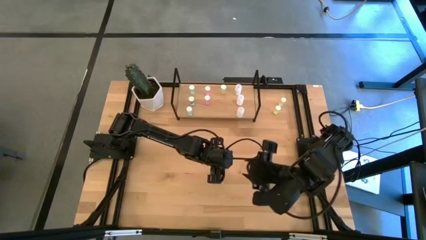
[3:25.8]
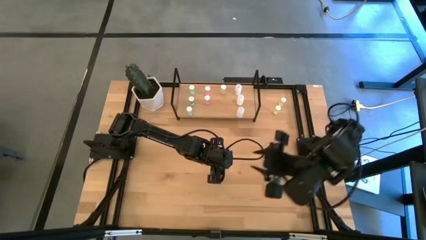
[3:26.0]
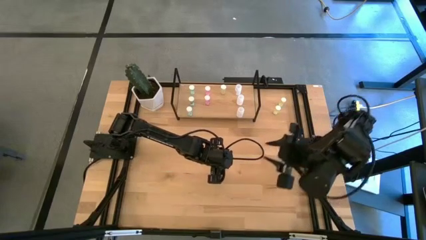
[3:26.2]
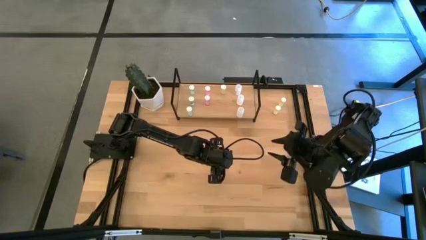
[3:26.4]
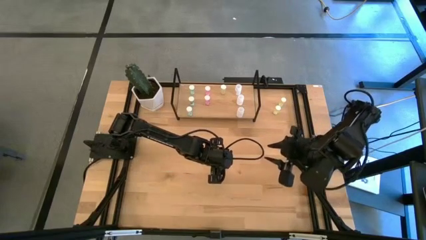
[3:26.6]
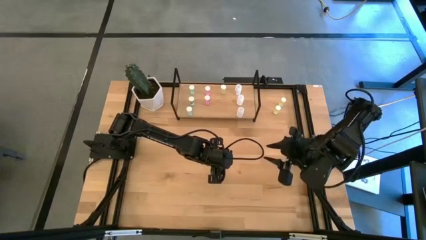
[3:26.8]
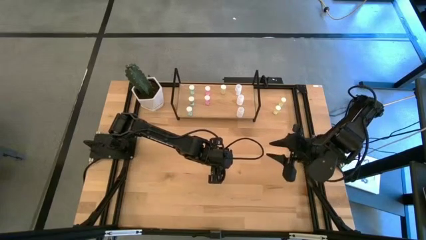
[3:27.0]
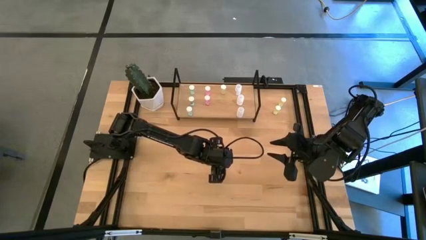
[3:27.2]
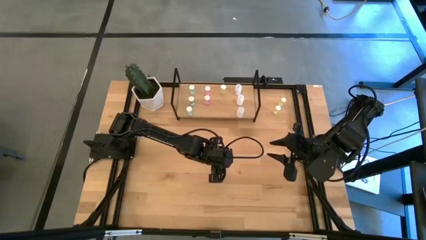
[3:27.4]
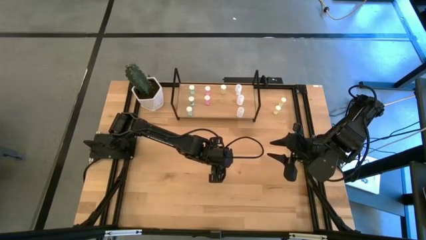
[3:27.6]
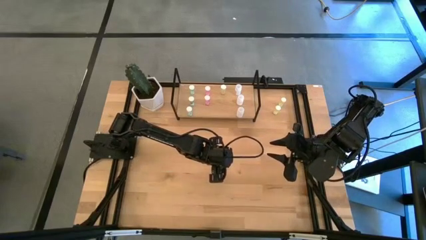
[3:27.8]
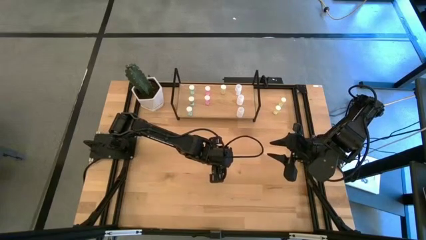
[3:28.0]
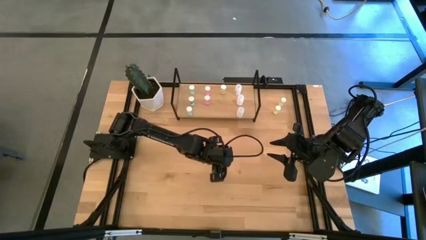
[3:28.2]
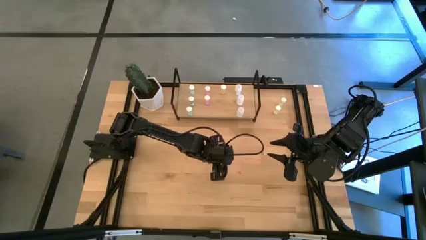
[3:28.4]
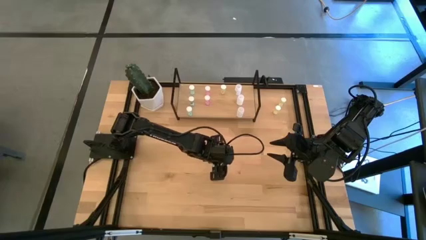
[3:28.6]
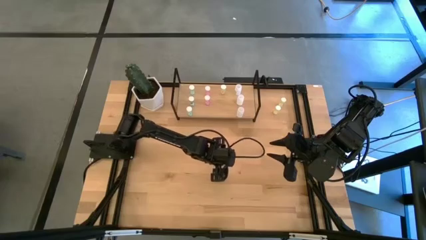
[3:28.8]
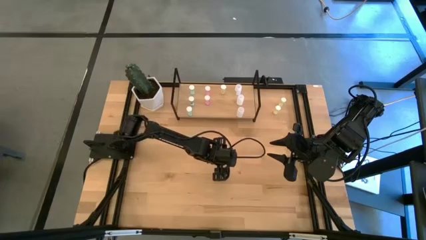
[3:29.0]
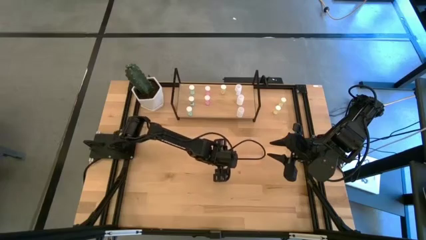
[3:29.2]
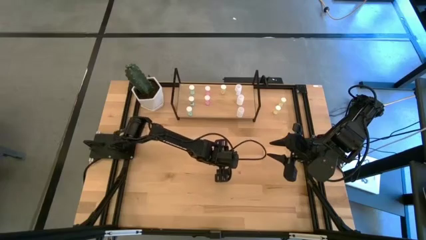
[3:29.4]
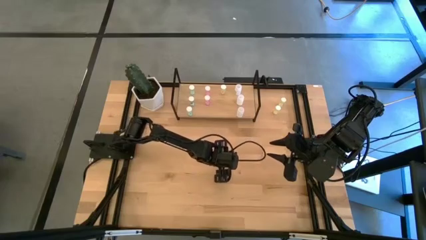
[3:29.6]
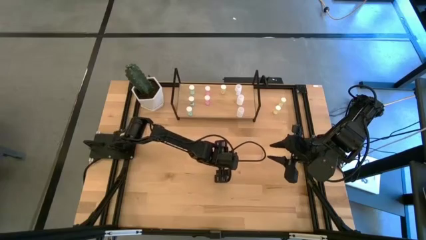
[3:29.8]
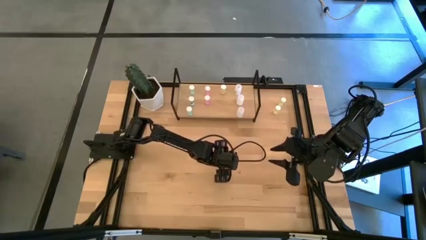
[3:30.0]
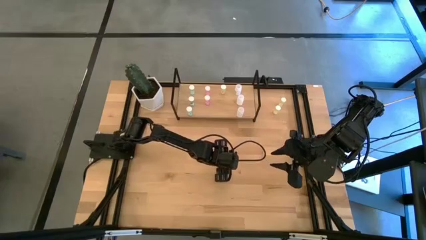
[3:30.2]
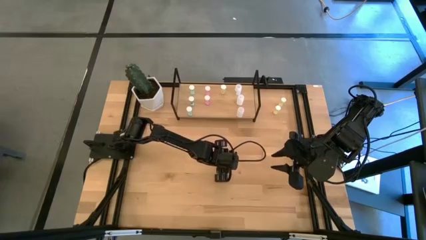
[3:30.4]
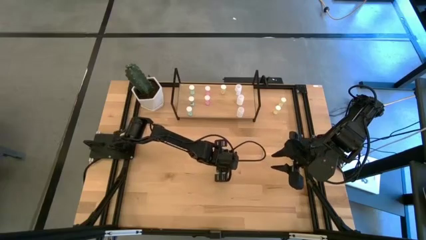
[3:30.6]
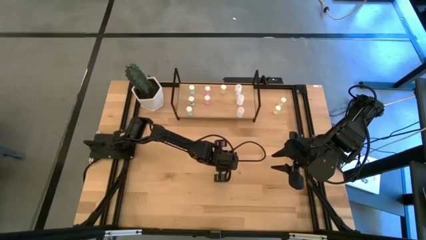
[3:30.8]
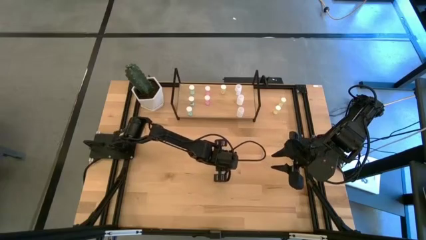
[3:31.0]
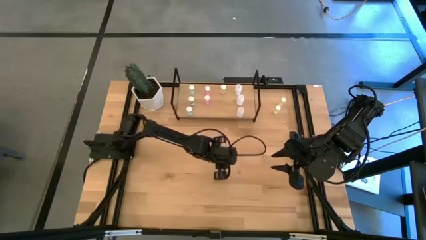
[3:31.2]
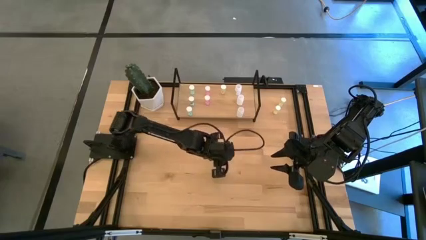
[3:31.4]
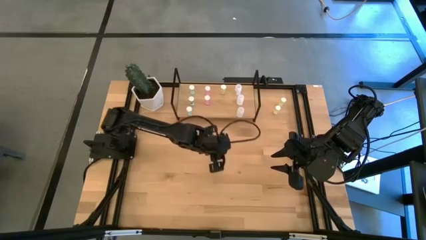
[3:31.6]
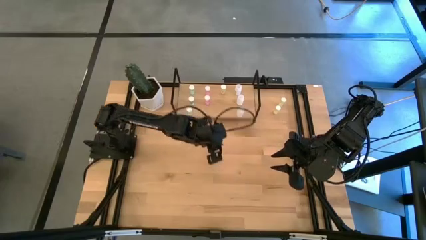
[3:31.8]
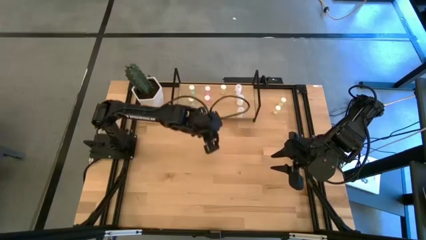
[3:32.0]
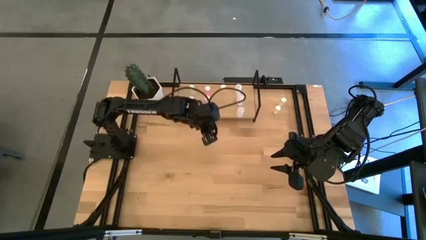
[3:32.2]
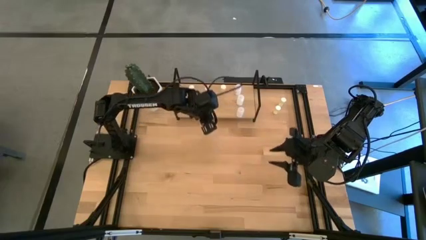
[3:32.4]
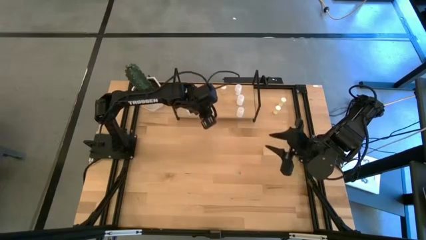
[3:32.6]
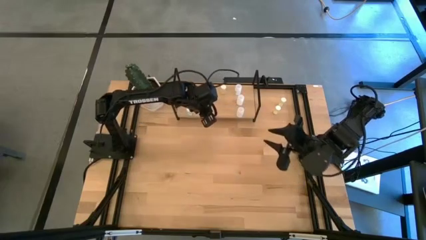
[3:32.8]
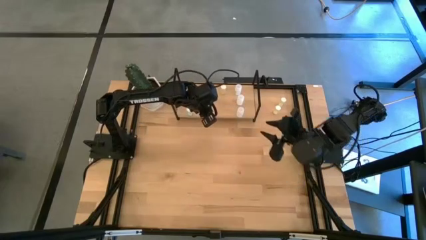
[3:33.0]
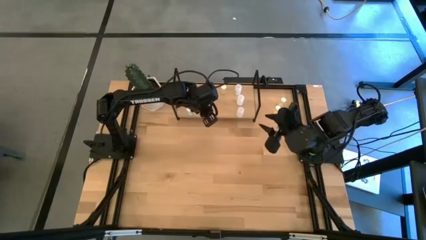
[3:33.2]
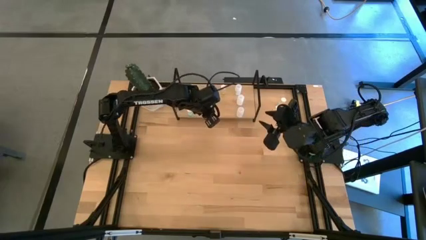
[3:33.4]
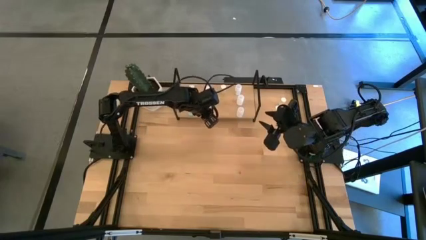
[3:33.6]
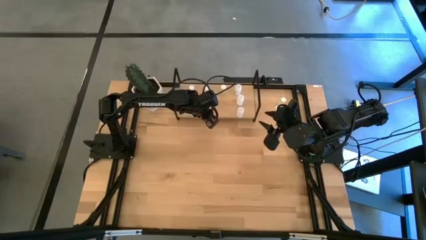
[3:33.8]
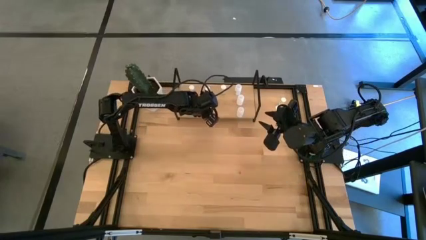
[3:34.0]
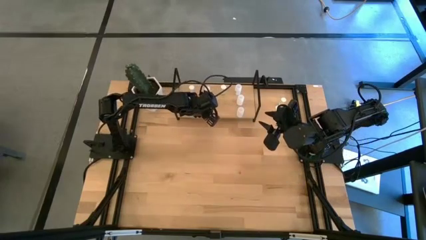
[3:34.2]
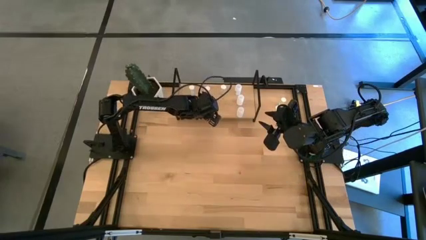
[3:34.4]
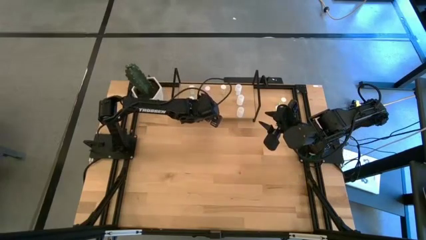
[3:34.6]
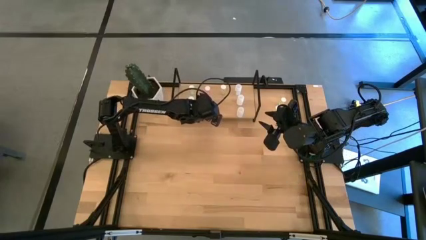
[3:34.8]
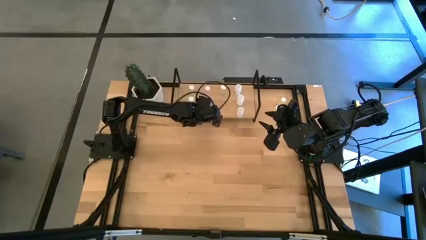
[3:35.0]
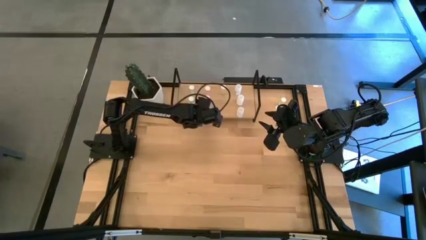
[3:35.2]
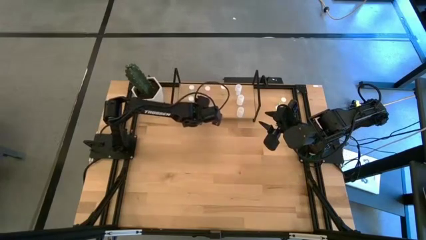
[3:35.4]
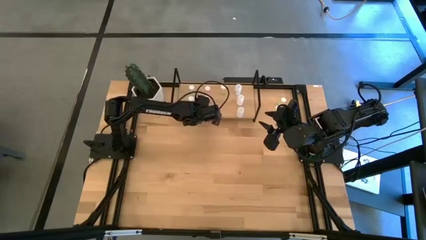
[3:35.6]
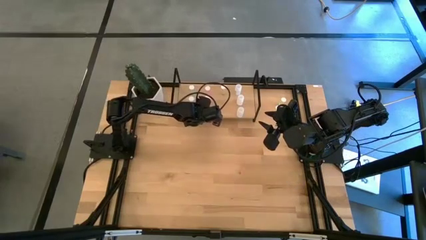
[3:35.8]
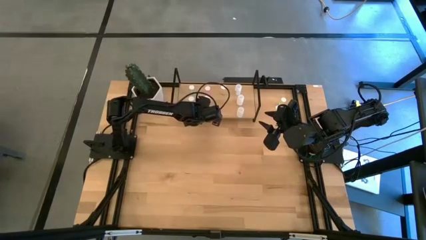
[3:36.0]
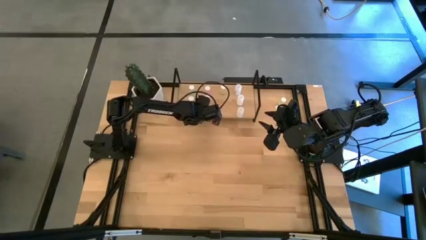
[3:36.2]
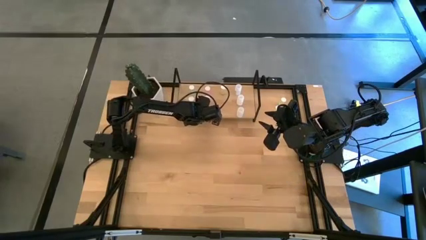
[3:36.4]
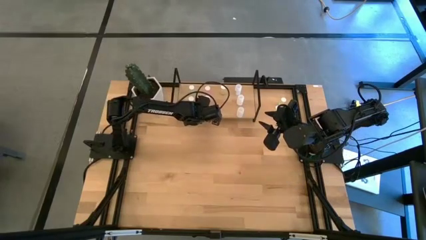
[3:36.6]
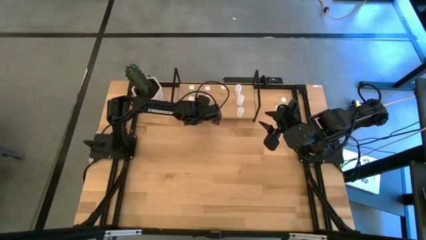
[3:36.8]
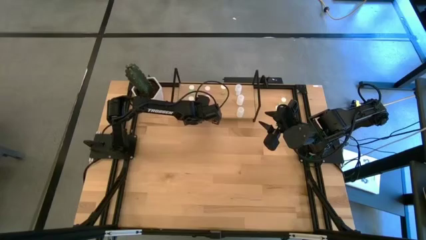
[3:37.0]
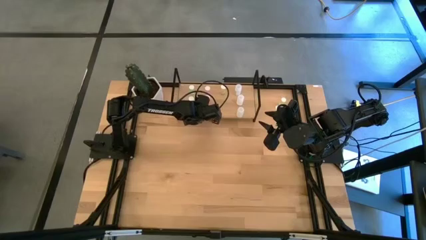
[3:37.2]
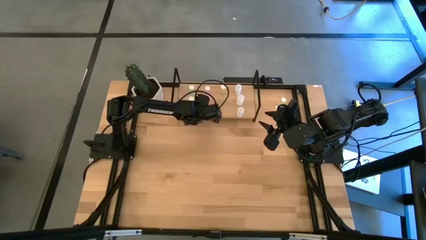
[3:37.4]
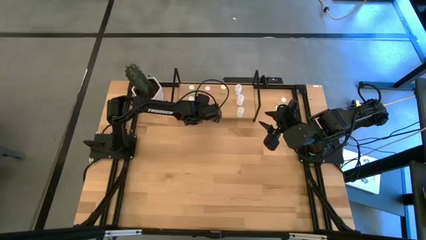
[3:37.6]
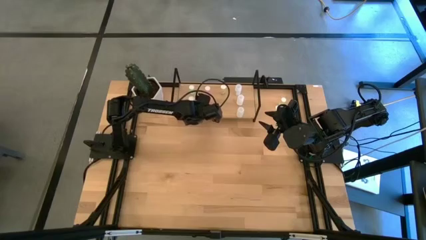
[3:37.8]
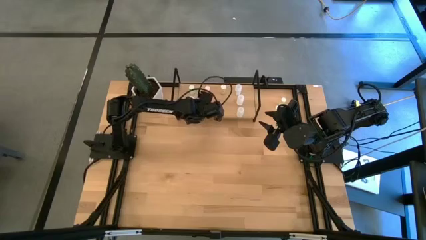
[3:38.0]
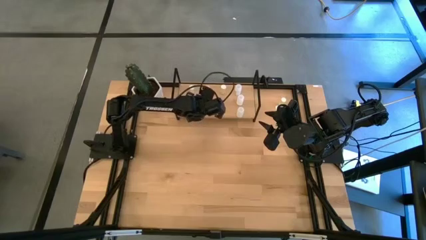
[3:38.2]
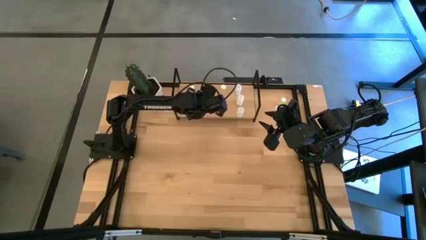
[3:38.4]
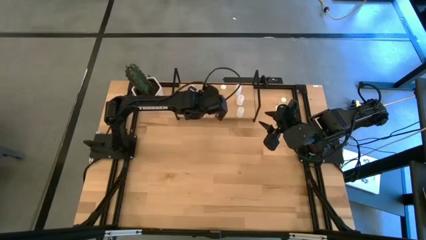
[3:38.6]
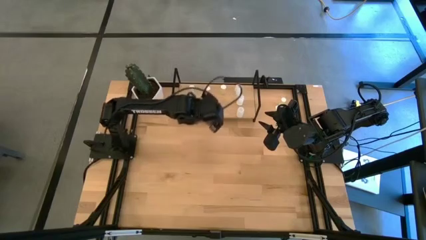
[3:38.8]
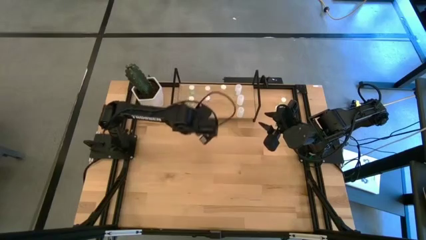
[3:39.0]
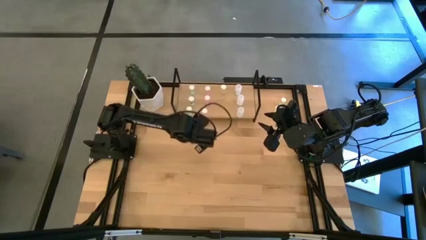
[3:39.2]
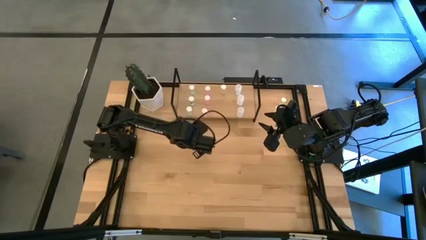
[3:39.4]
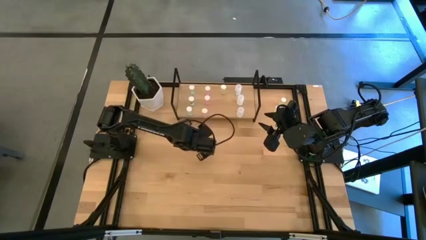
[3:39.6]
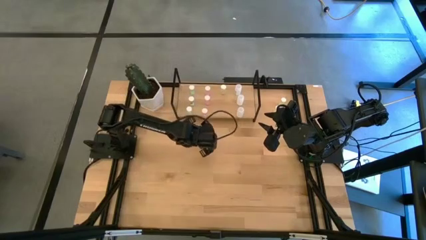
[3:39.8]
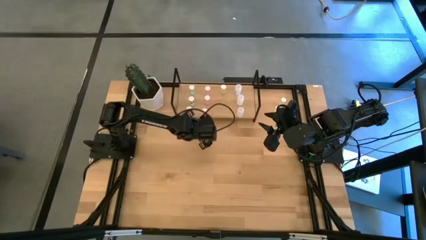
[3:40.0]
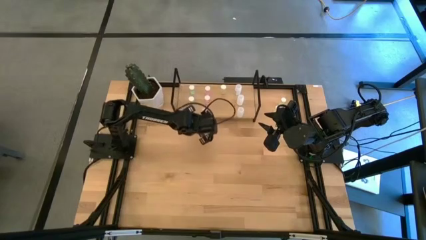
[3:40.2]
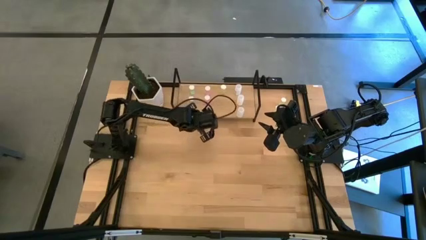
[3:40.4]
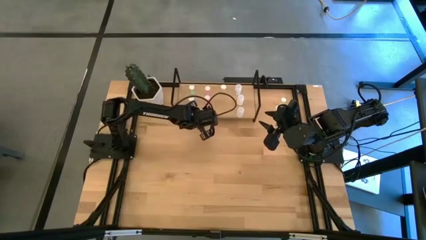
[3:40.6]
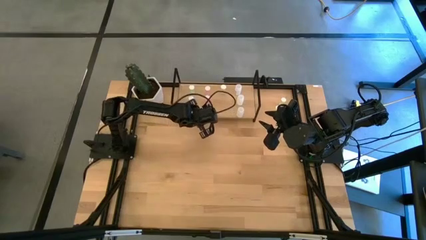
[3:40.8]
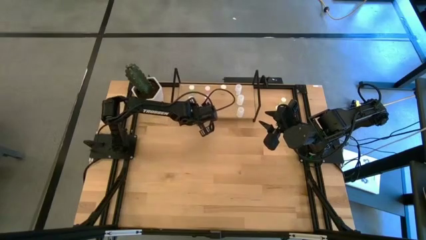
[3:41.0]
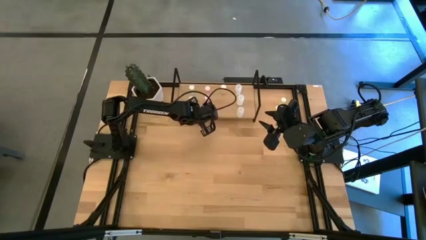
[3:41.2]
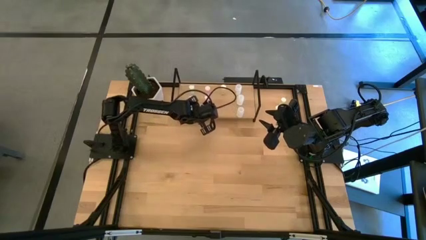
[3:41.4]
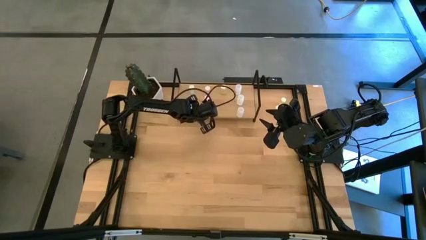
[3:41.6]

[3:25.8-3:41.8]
Task: Pick and place medicine bottles onto shelf by color
Put the pink pill bottle on the shelf aligned with the other pink pill bottle
